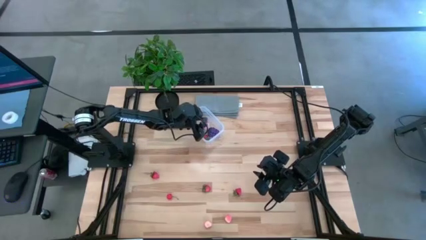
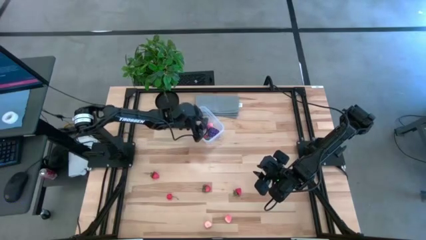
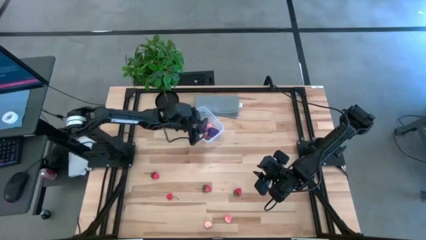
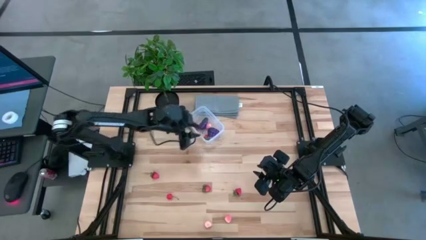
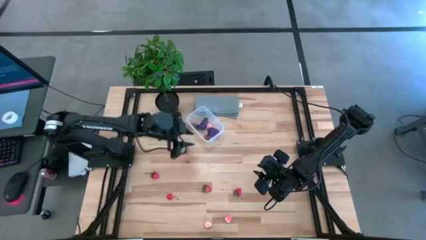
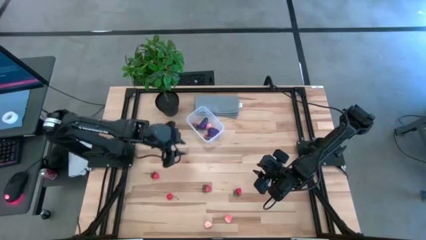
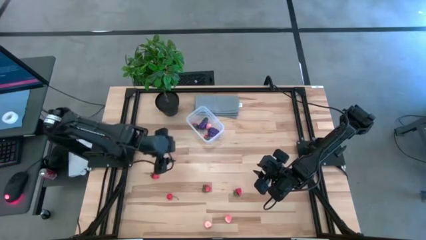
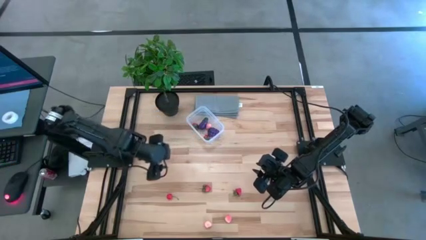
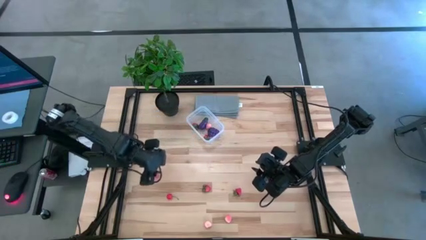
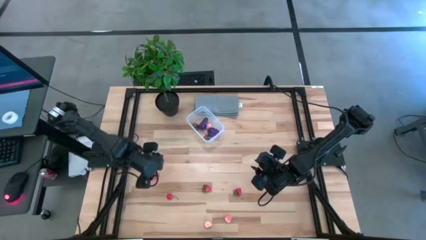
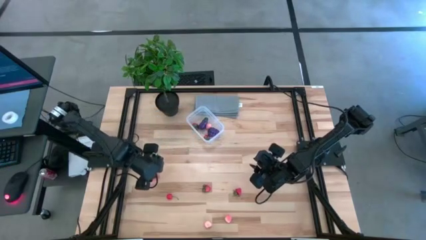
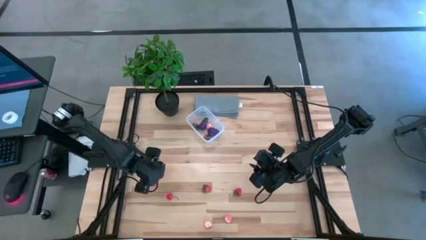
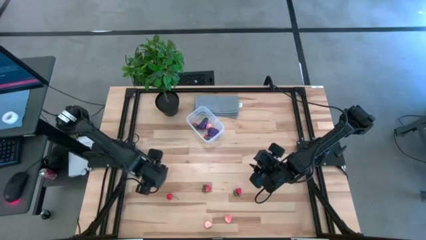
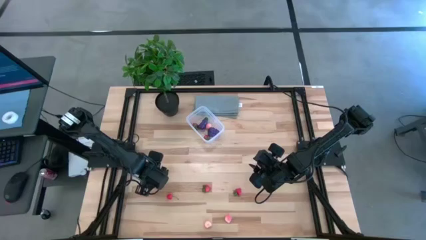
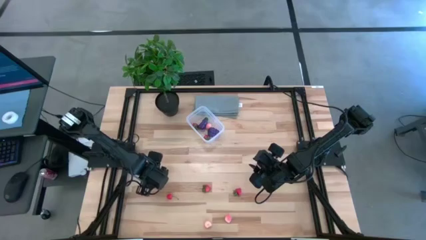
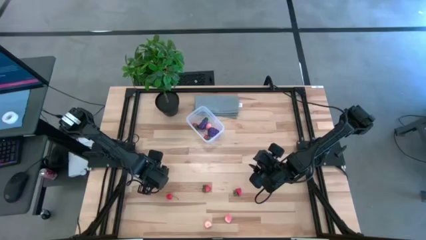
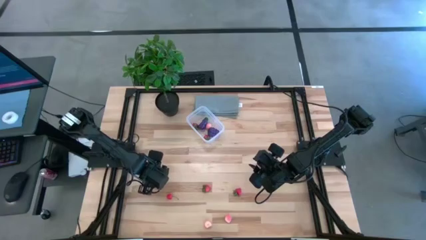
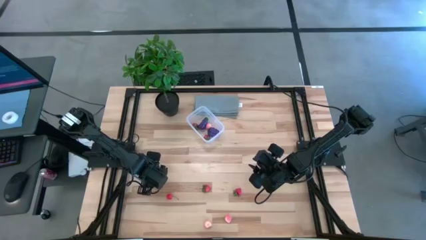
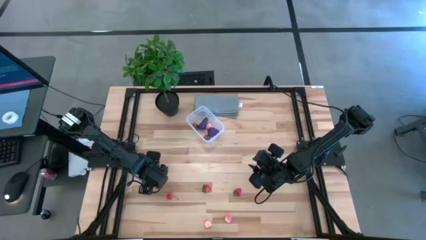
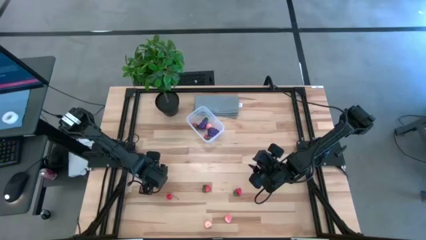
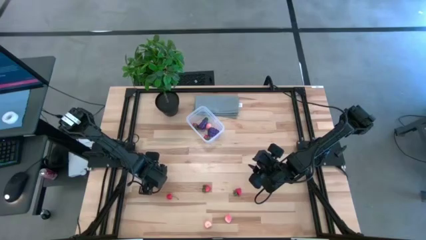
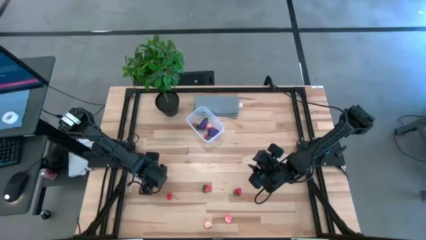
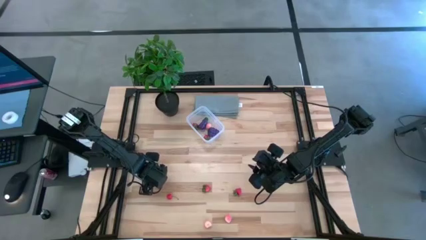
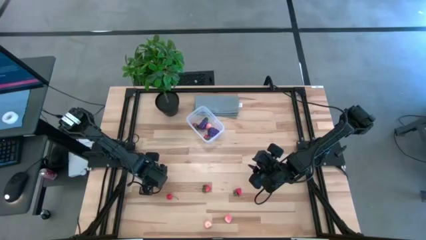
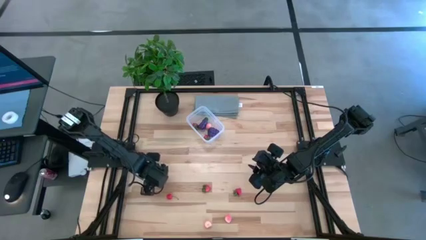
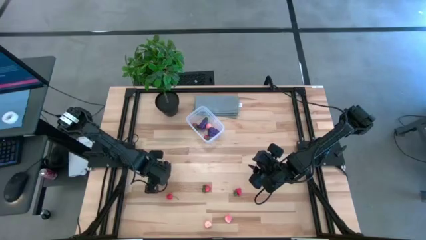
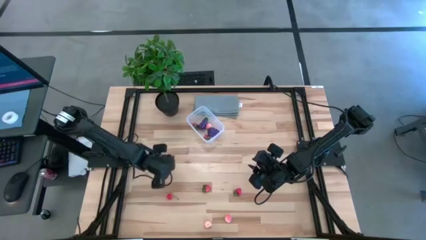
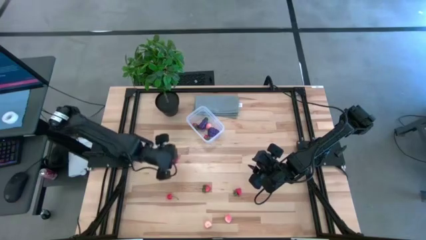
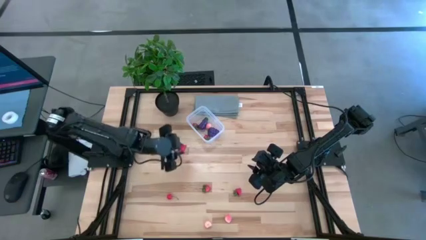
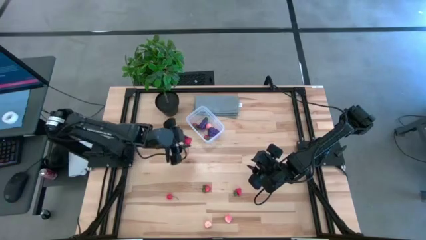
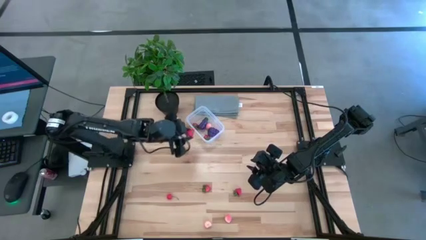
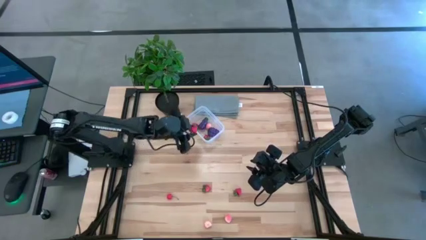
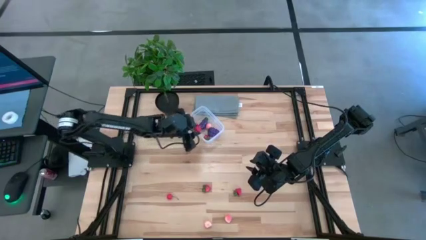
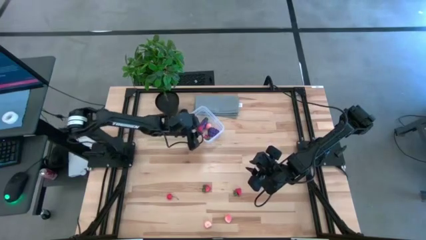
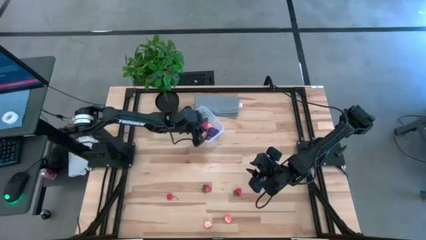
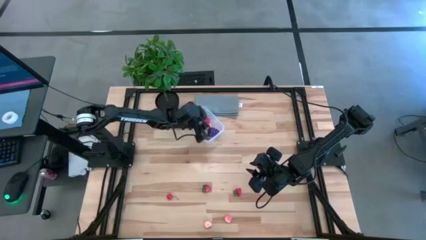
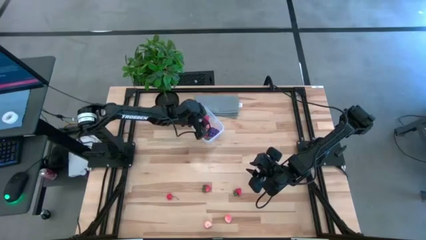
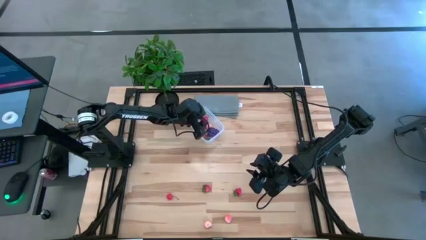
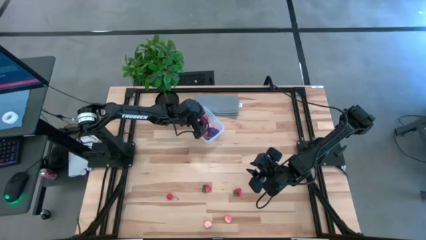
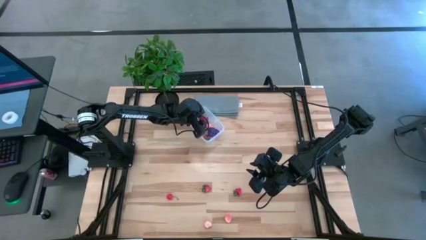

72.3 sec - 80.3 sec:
Task: Pick and placing Produce into tupperware
Put the red strawberry into the transparent bin

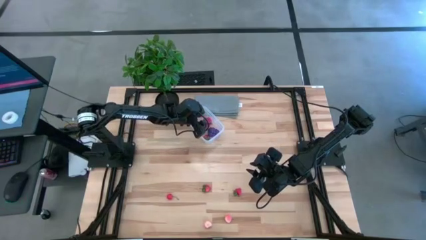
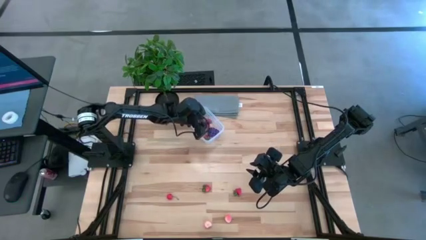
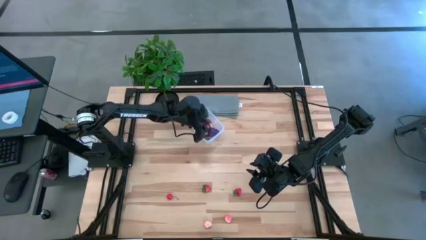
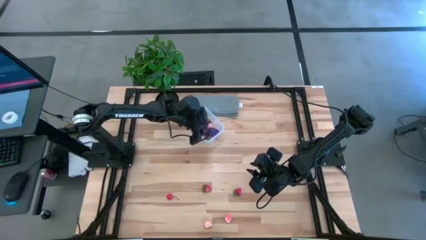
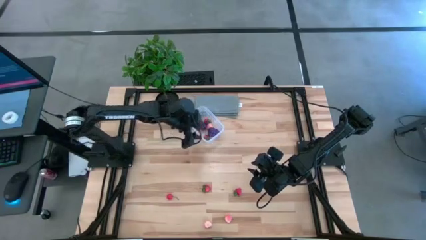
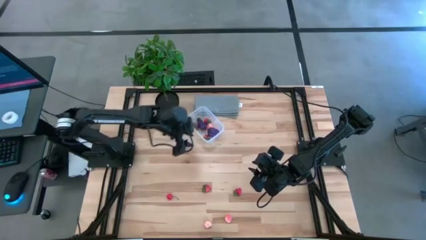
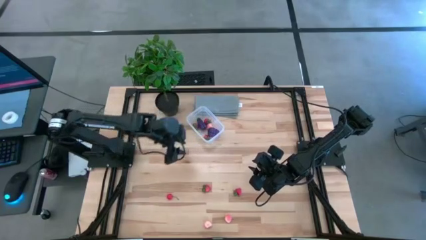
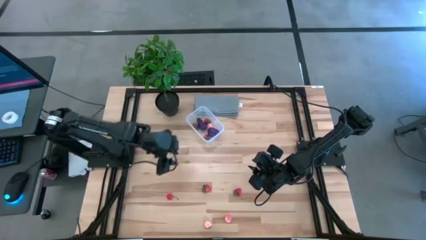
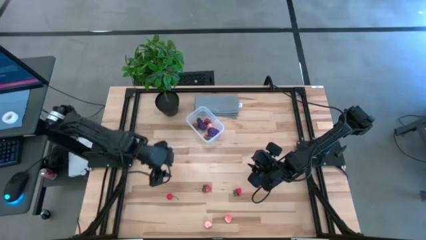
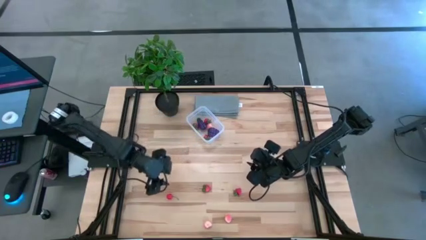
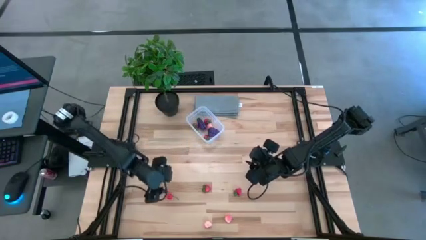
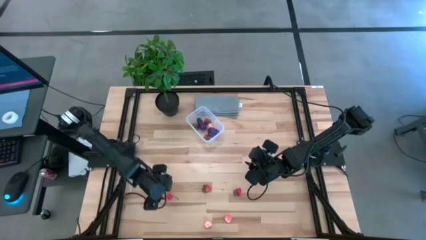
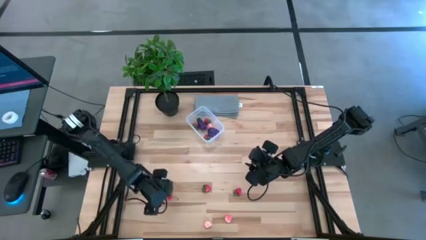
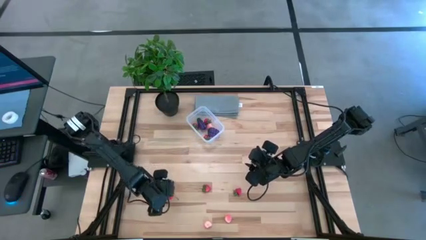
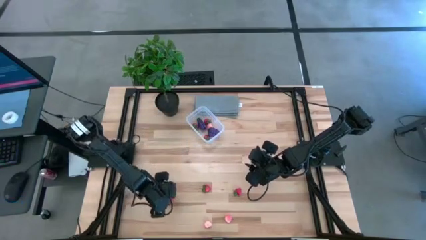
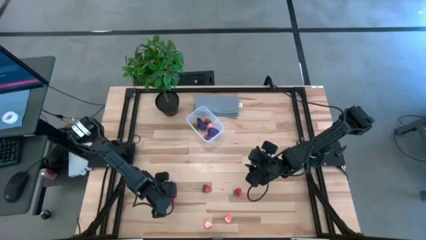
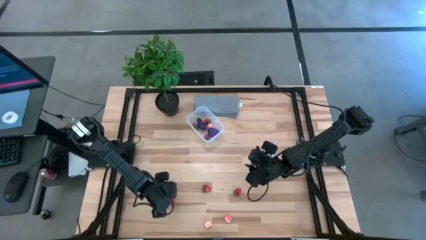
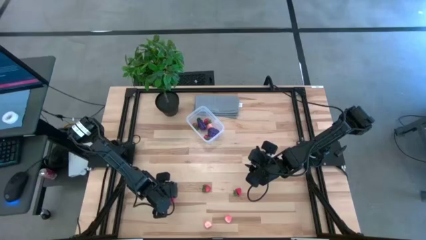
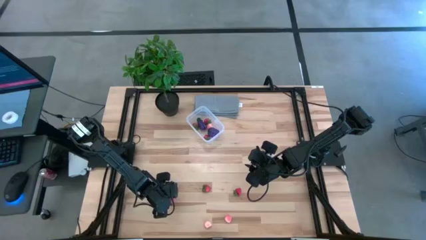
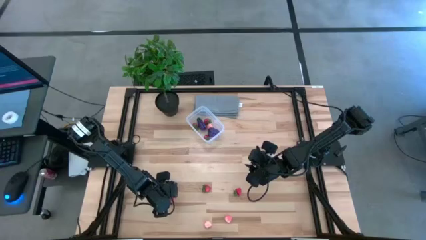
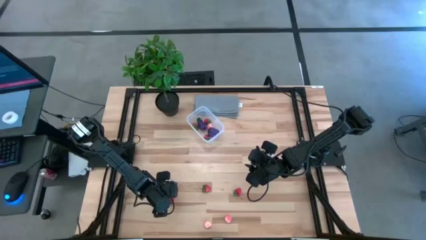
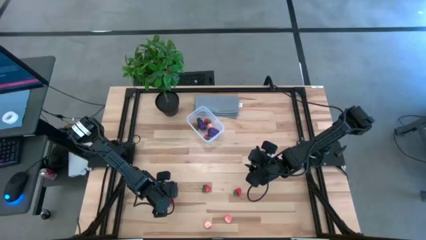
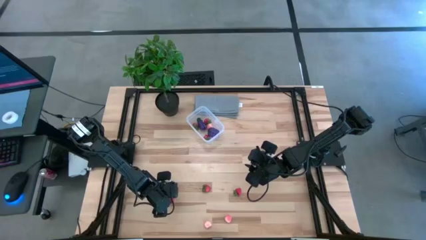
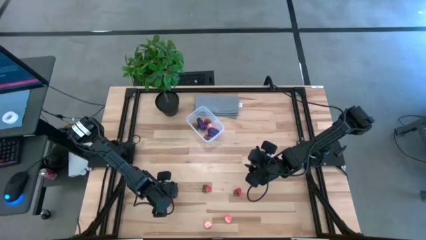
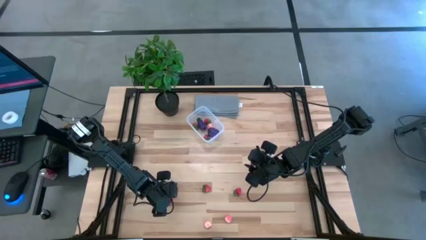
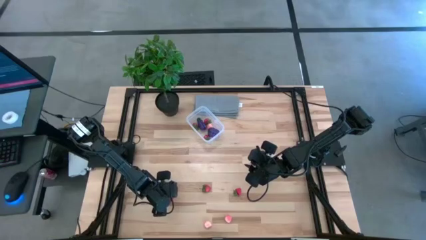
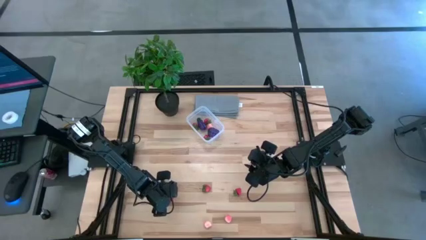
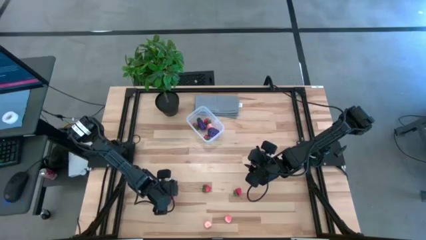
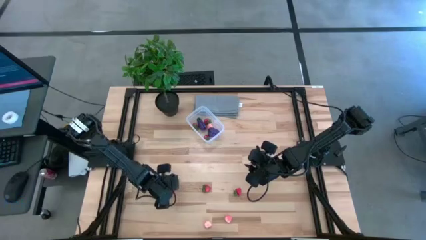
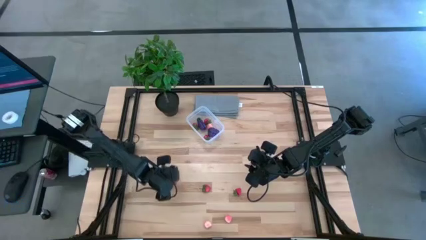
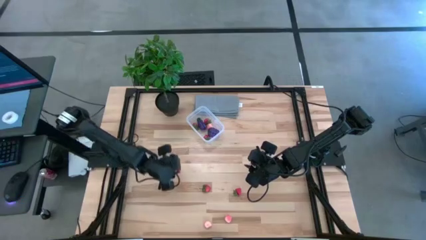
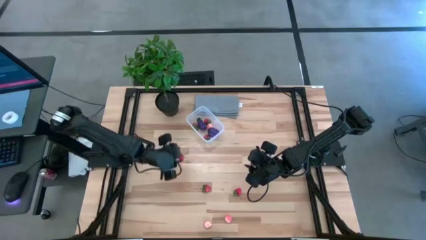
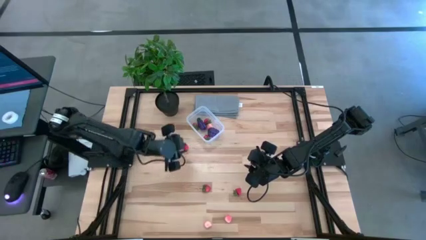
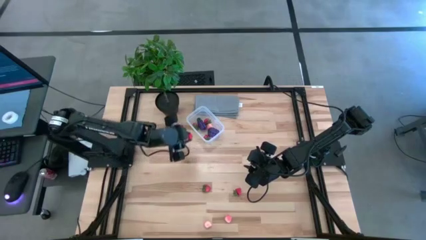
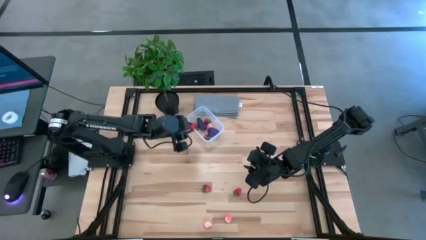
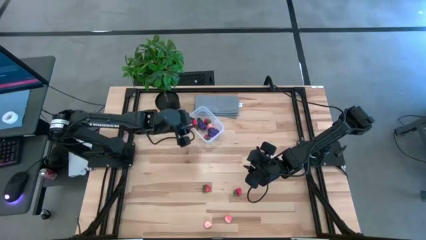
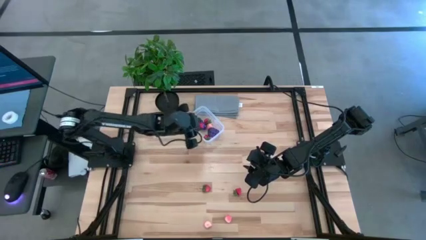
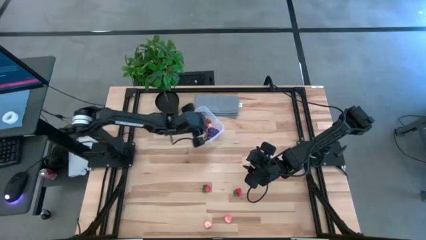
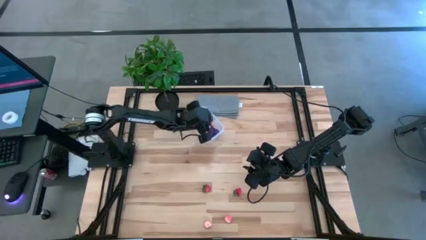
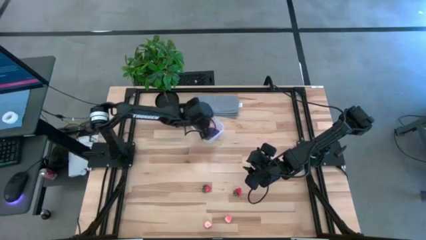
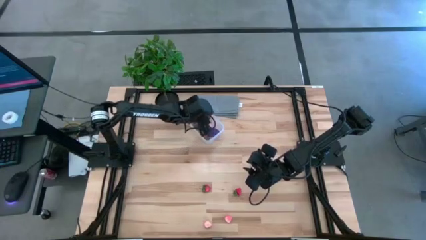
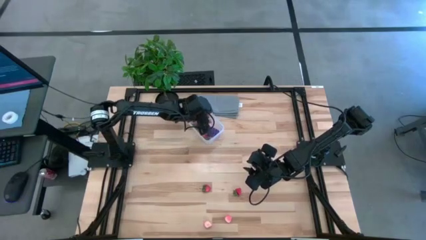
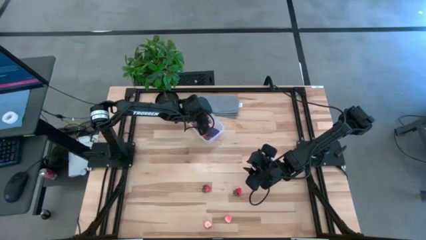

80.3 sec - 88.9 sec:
Put the red cherry into the transparent bin
